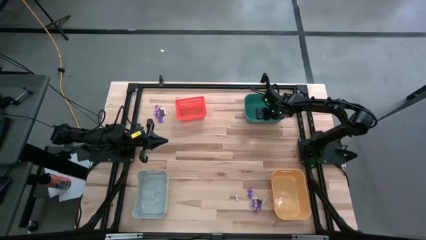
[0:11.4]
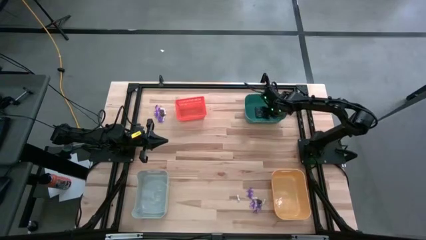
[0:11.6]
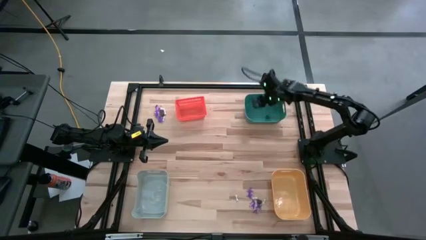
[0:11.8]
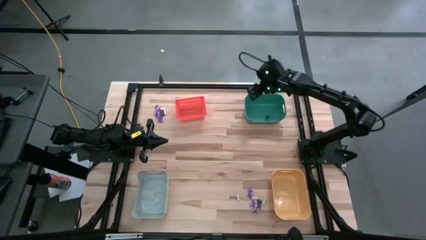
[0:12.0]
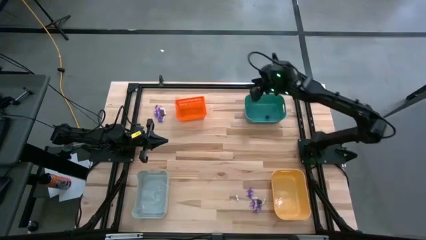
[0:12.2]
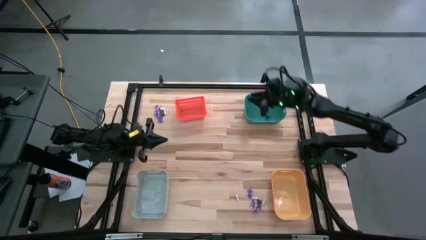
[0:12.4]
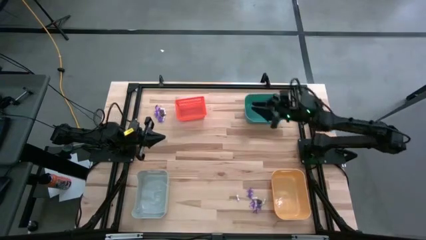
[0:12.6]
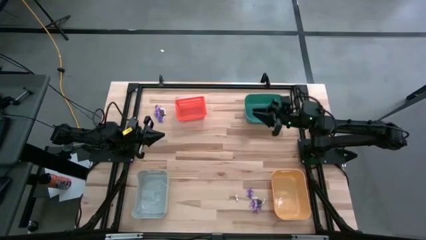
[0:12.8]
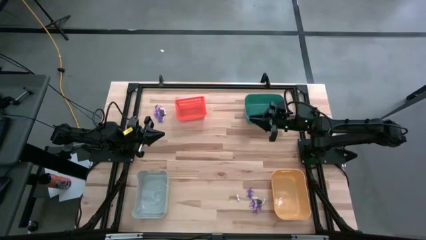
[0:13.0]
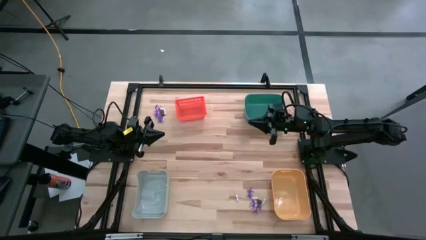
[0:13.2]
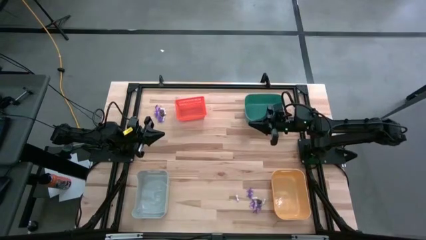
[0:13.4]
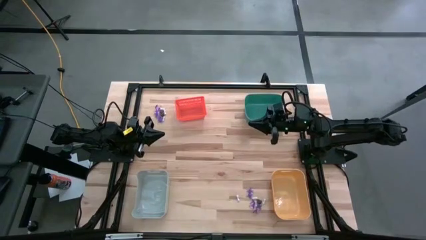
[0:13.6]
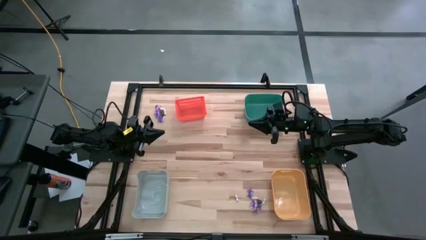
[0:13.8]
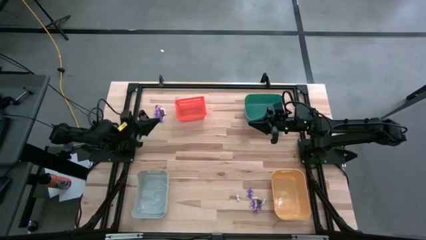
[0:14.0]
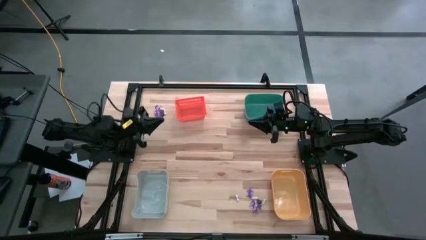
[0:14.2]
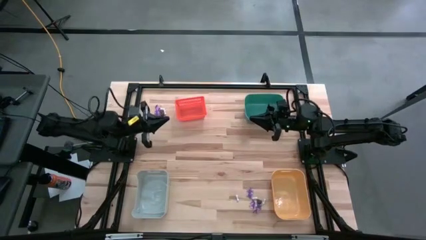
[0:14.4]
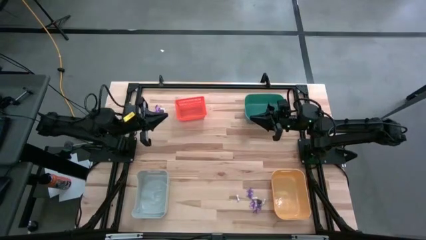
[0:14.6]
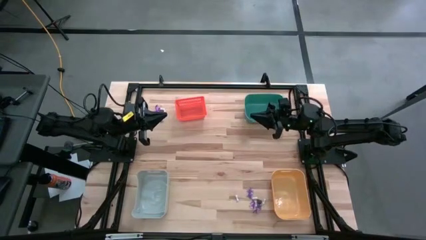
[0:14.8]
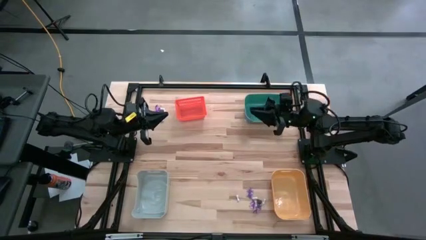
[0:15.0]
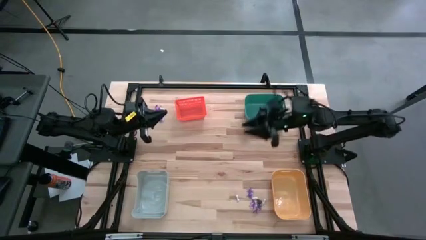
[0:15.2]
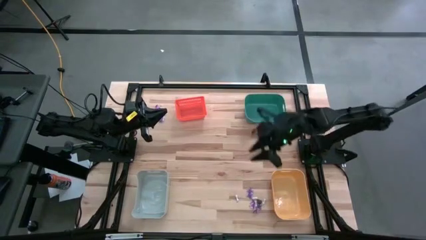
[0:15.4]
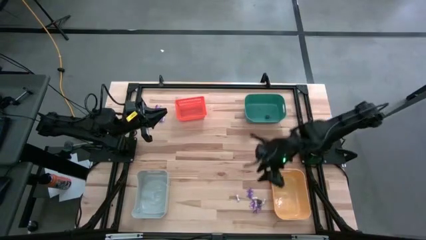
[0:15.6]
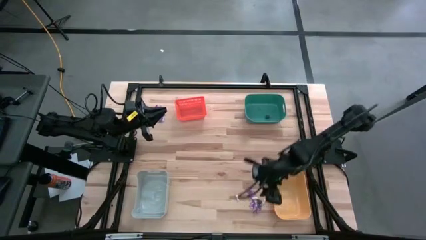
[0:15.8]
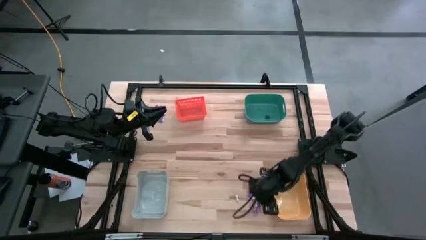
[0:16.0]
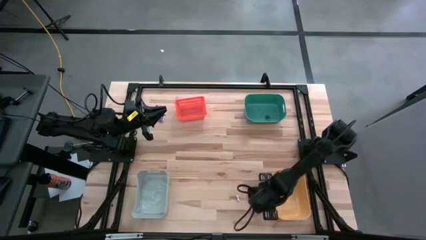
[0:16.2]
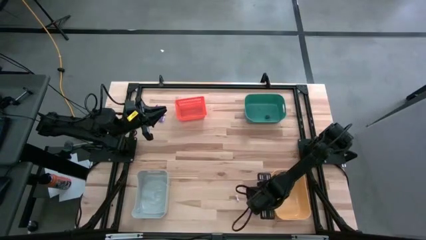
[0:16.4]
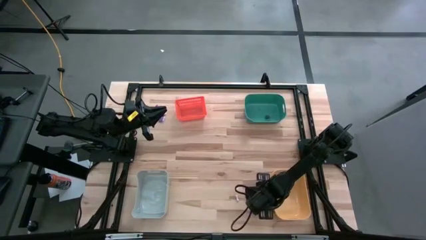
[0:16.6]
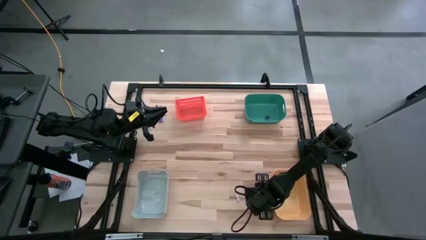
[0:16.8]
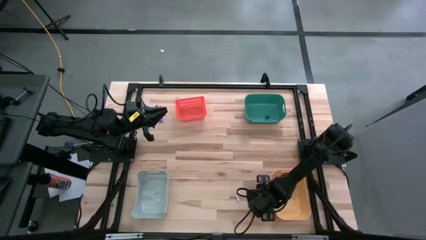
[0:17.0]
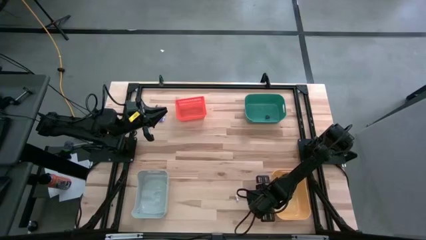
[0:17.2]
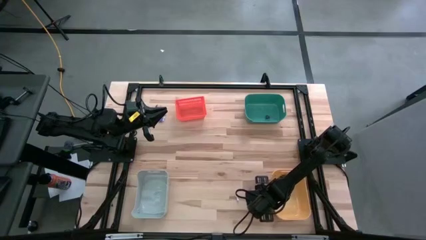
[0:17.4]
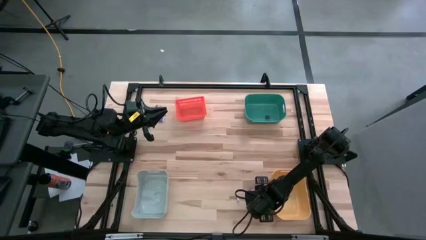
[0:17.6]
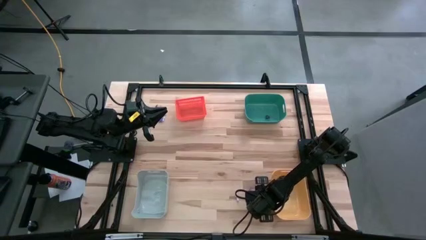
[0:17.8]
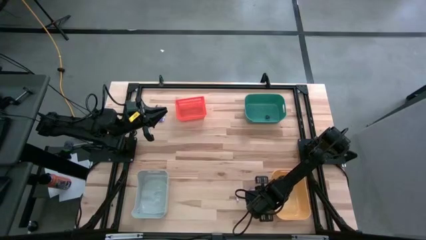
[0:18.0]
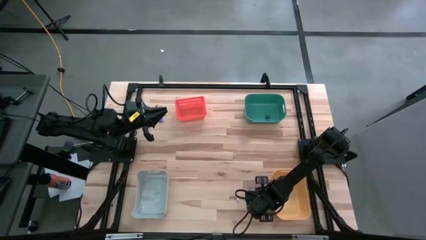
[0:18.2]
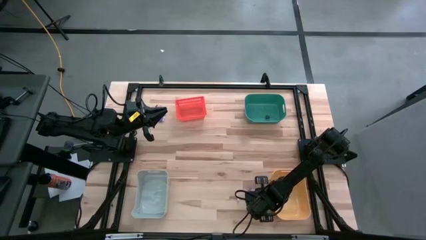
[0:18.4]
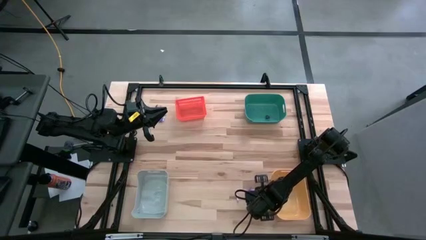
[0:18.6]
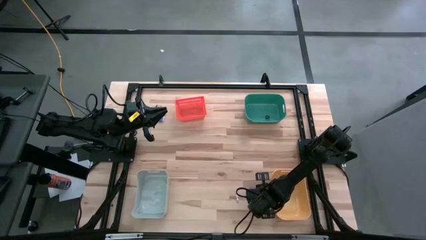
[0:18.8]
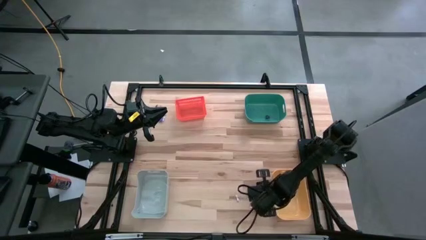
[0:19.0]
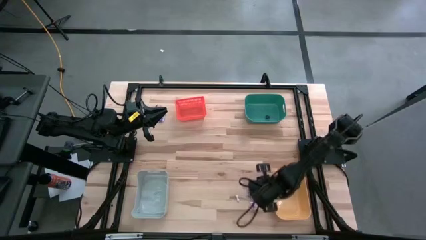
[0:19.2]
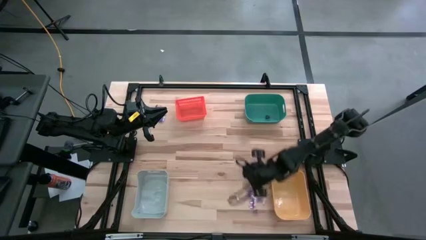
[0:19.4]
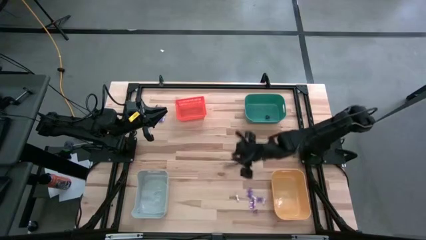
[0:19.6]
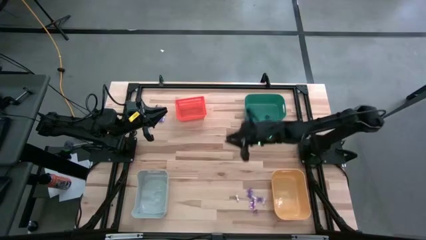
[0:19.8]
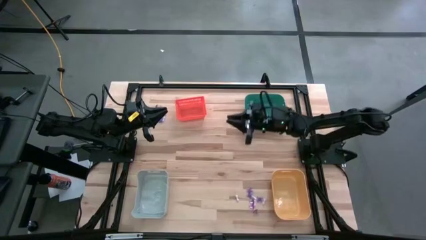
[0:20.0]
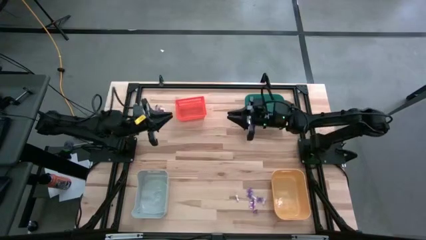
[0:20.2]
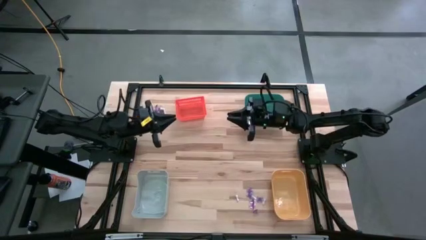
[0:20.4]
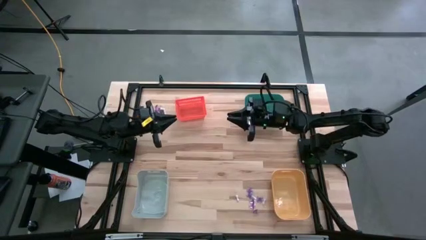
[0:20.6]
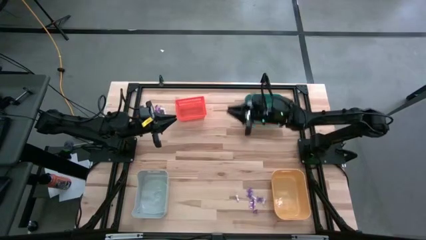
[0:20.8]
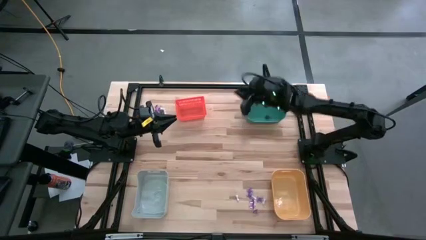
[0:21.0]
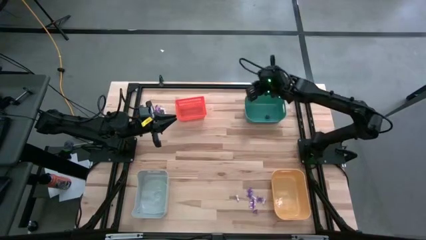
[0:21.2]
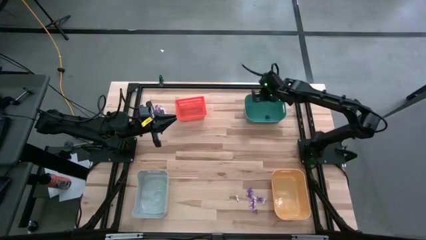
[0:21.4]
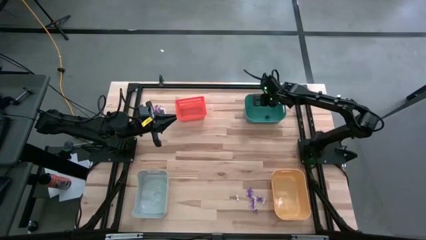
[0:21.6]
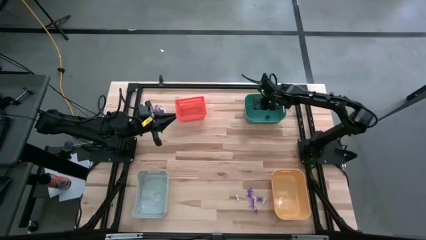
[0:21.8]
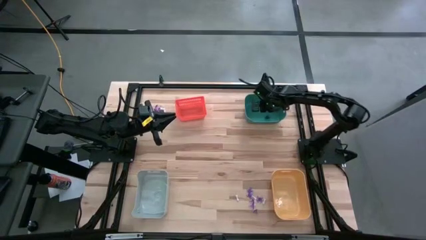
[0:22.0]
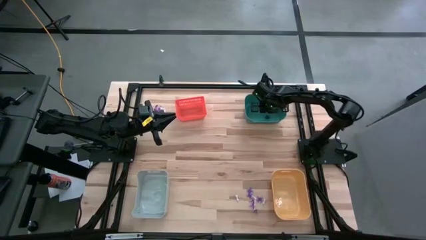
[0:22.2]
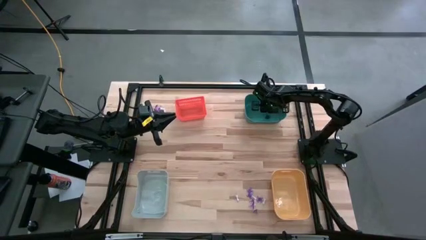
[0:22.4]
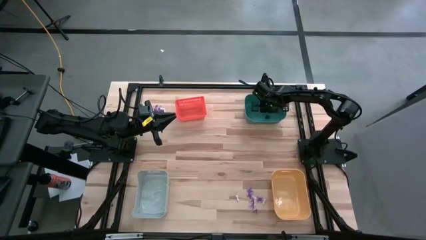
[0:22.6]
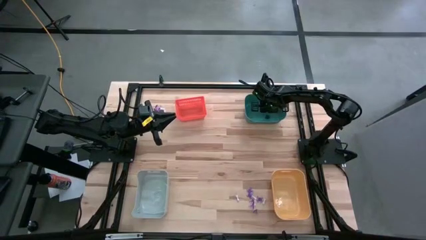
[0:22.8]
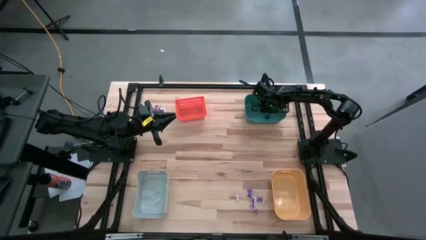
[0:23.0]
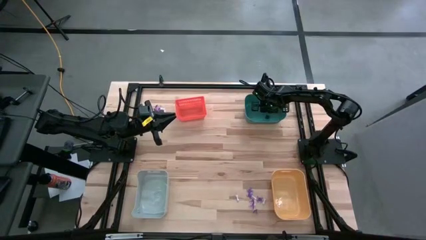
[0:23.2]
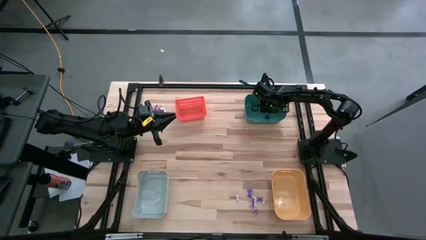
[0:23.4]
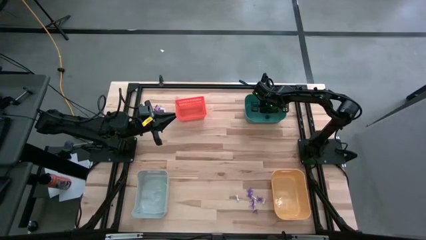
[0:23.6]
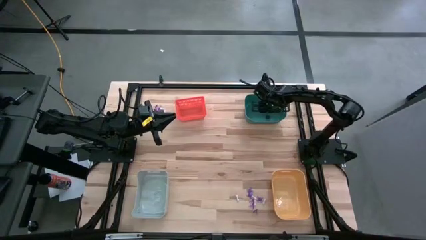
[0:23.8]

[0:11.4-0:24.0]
Task: Sort Halloween decoration
Put the black skull toy into the green bin

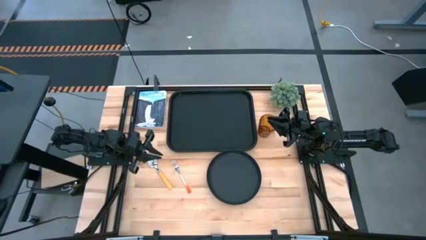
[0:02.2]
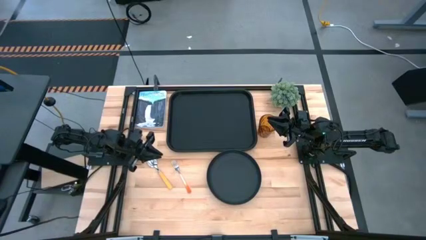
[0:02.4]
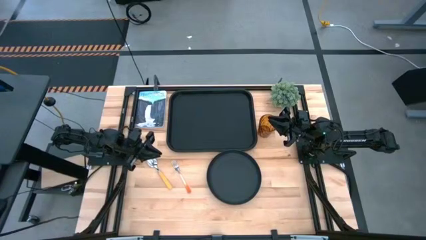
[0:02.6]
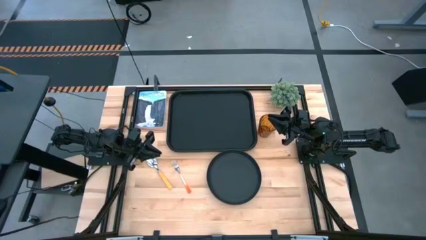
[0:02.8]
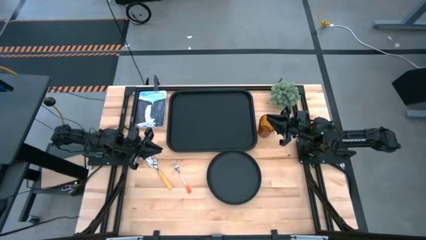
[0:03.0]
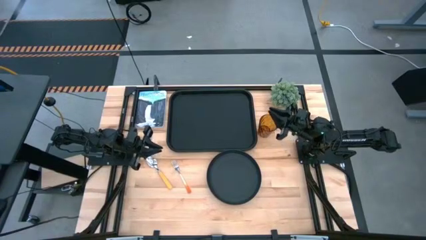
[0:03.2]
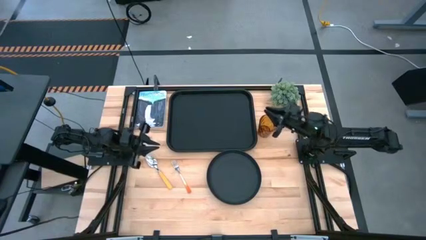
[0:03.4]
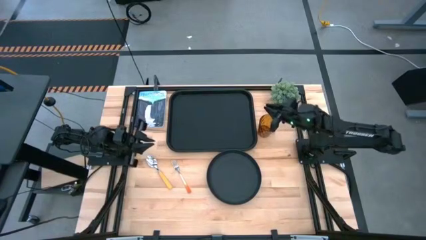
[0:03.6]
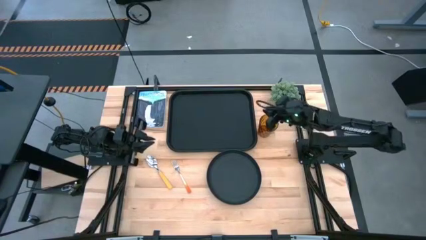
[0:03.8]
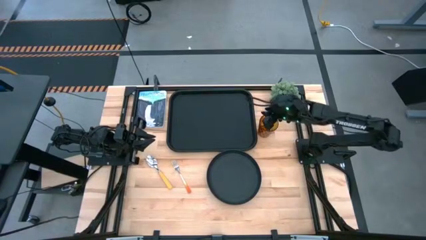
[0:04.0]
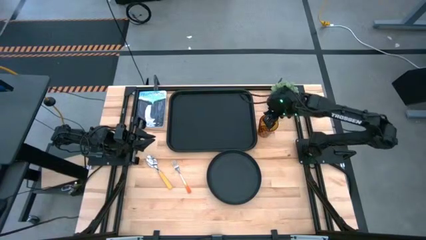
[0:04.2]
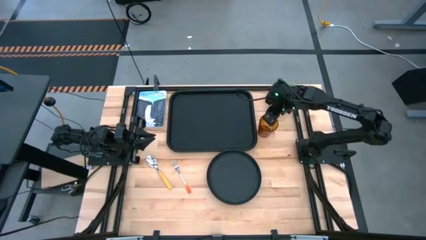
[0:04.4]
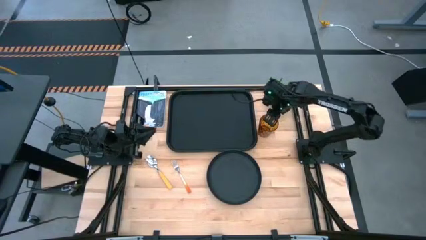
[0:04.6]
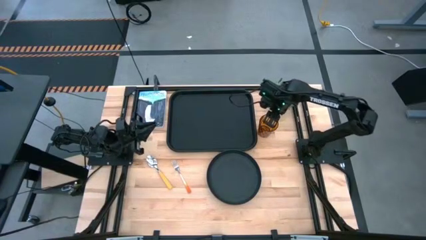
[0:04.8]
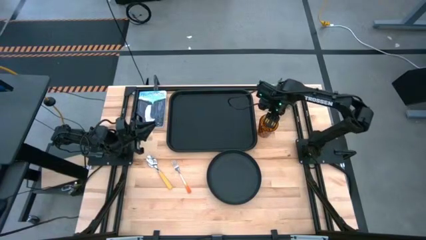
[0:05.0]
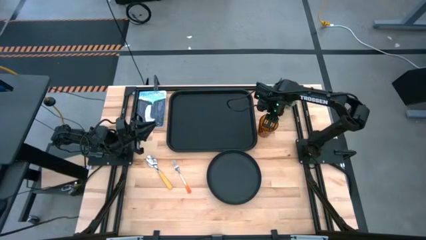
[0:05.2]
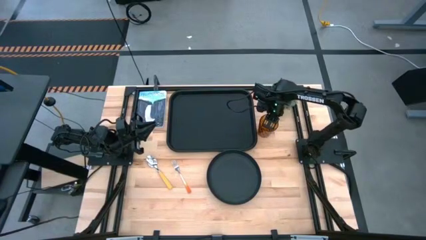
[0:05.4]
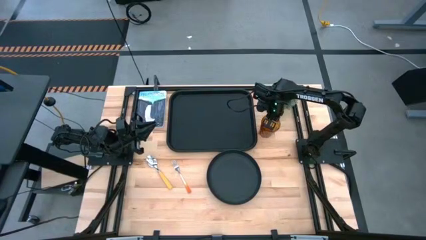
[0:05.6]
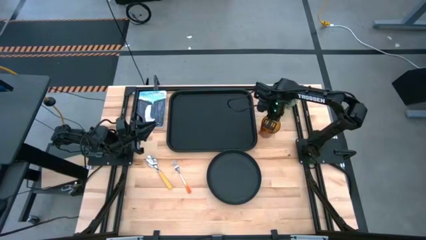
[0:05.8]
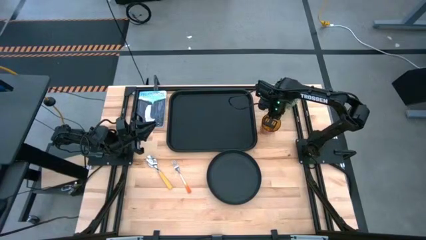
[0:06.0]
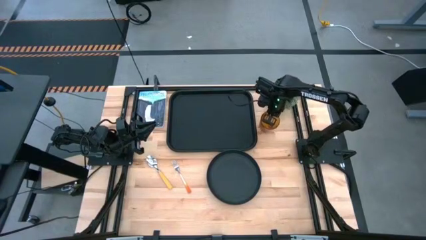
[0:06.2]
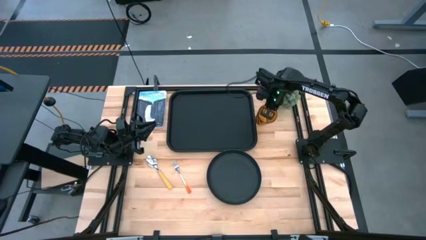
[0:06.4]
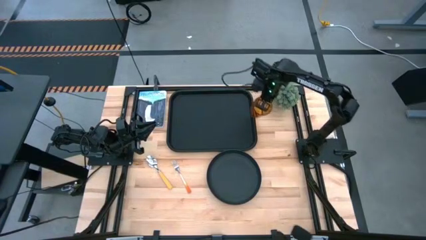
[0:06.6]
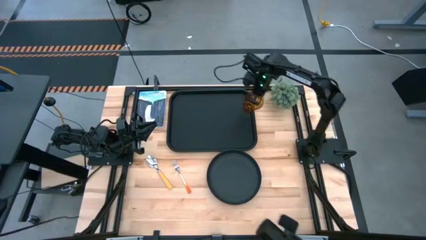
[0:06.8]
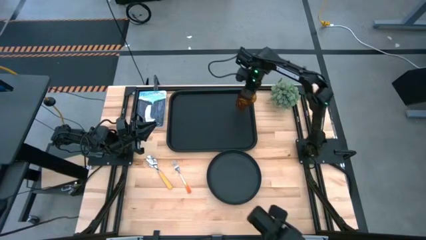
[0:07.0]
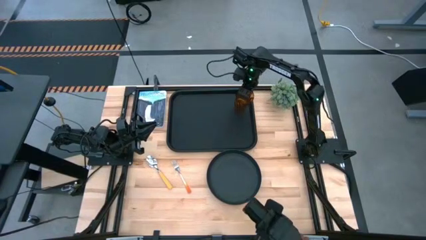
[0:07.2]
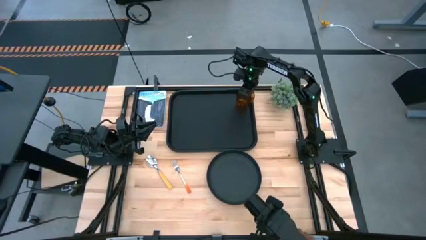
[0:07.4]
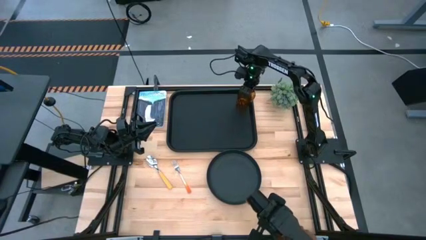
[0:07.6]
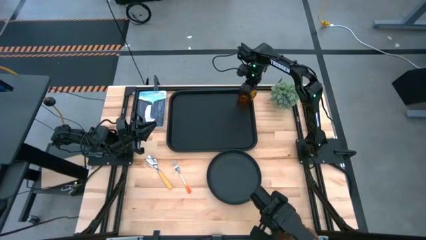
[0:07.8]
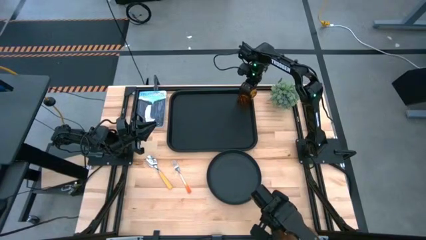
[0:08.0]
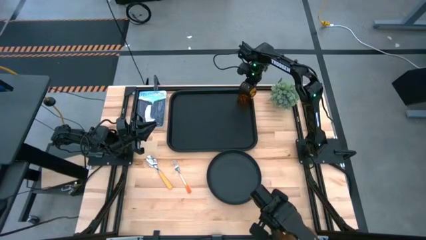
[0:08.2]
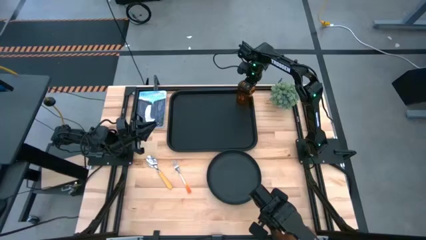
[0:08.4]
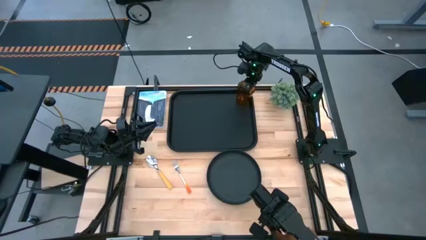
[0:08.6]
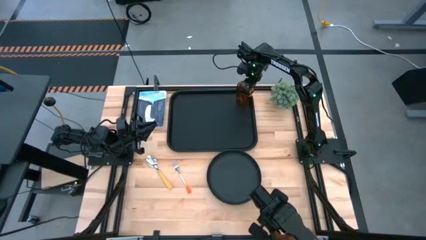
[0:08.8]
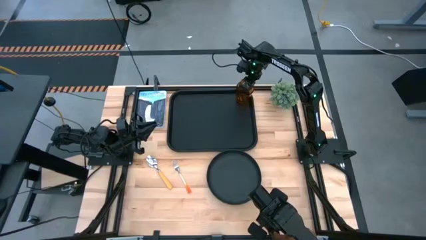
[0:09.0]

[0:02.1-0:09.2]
Task: Pick and place plate/cup/fork/spoon on tray
Put the orange glass on the black tray
